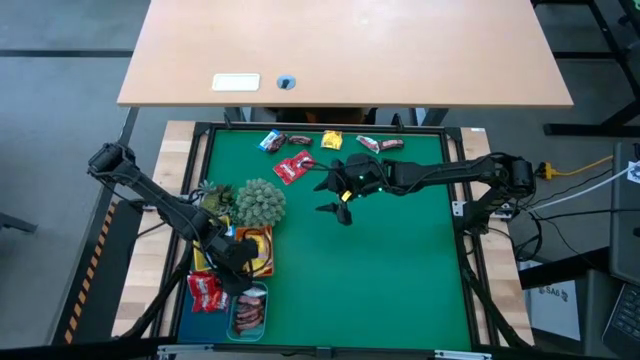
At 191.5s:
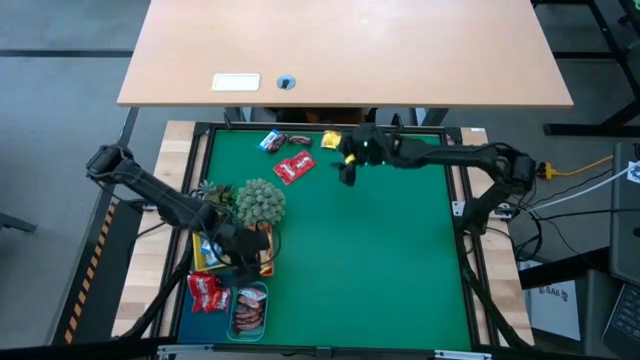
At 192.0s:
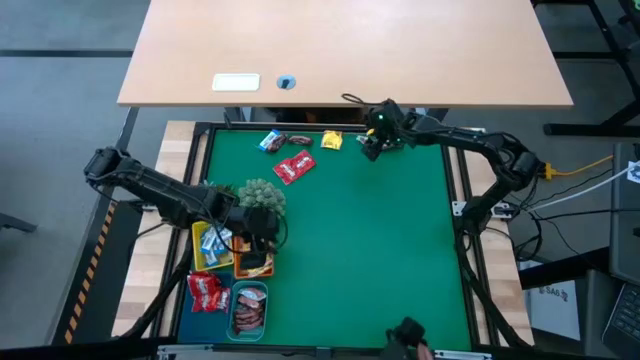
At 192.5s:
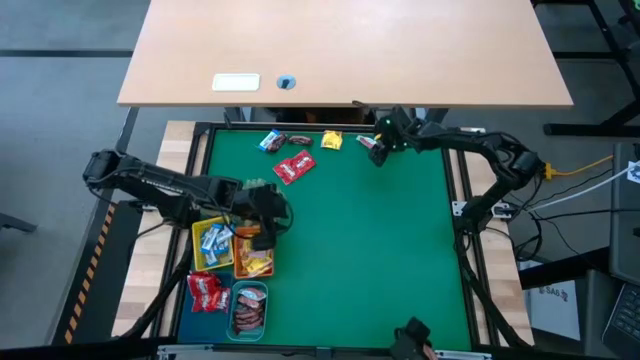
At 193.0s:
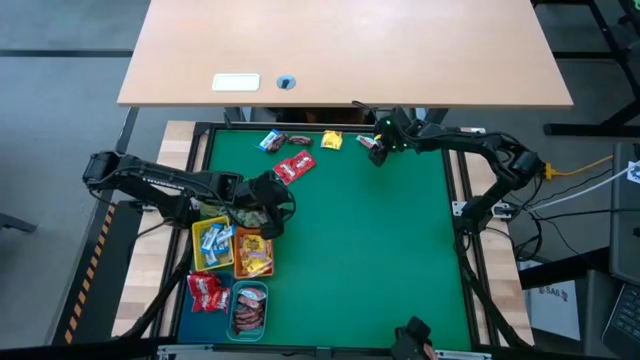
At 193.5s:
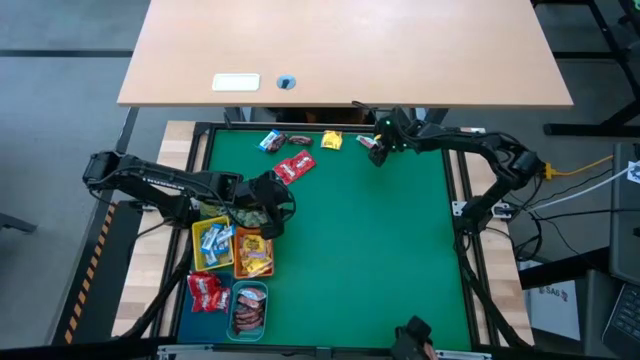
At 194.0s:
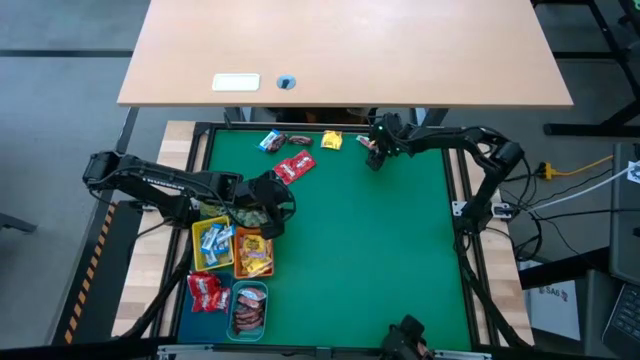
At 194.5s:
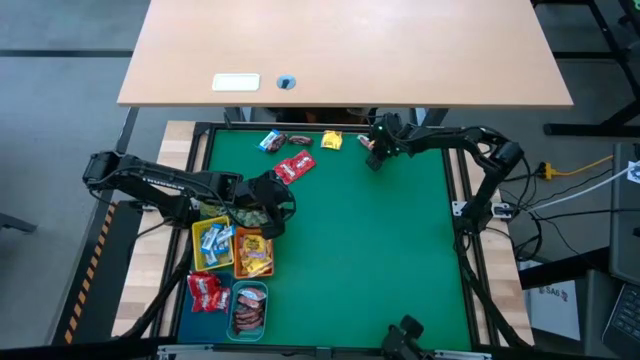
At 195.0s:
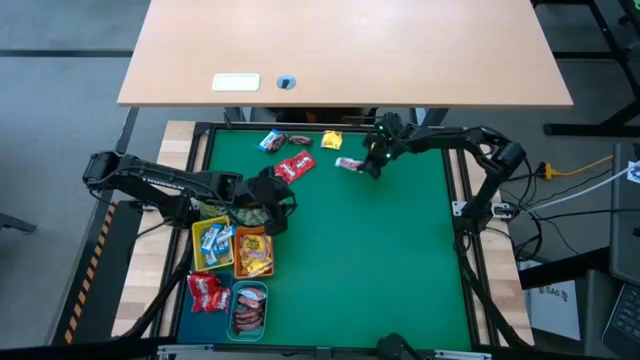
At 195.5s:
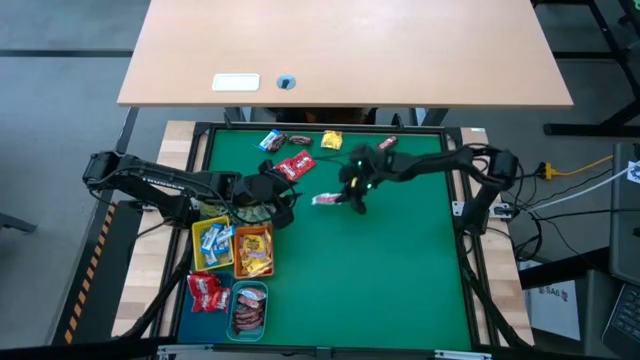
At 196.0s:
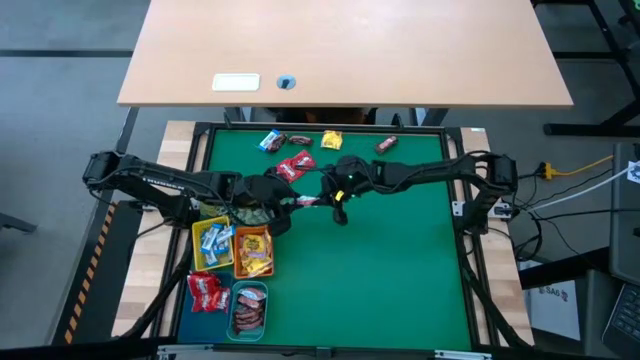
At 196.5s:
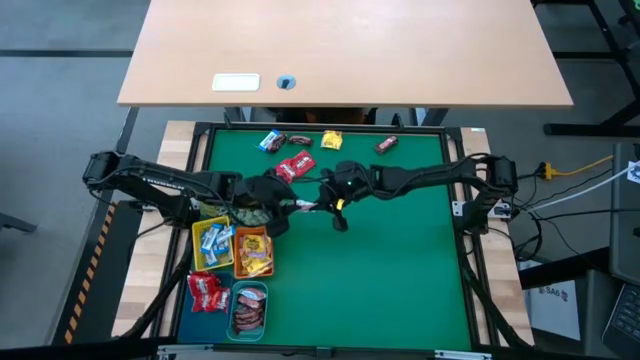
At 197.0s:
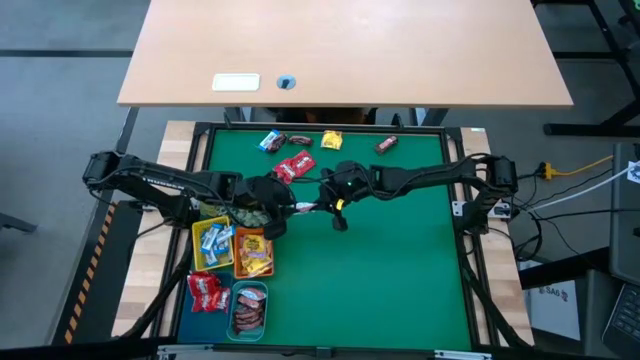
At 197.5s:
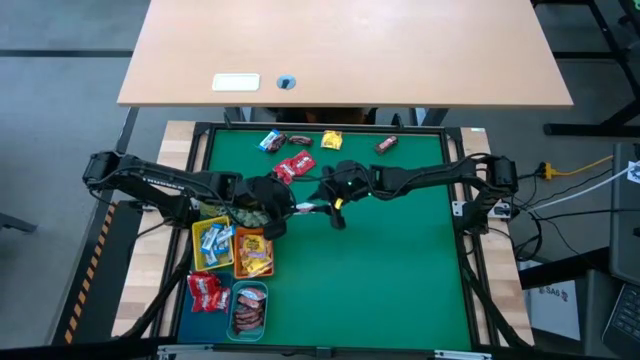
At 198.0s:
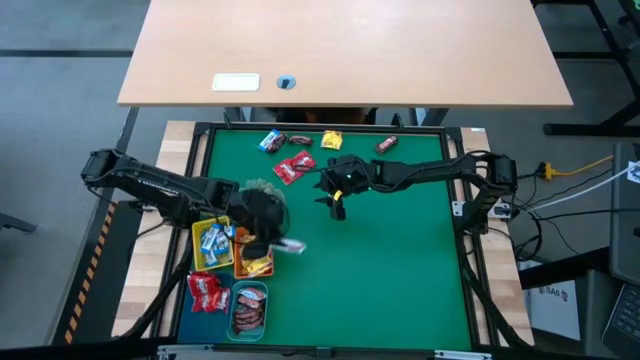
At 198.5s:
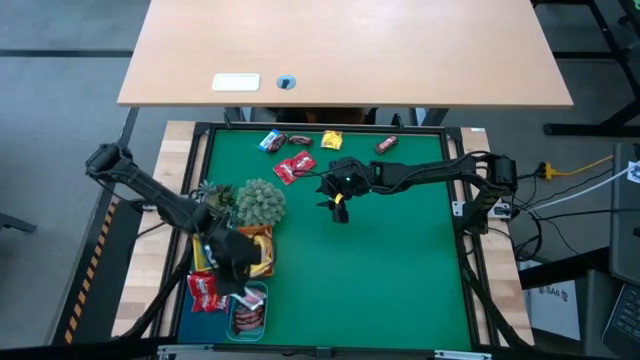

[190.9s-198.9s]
Task: Sort candy
Put the white chocolate into the green basket

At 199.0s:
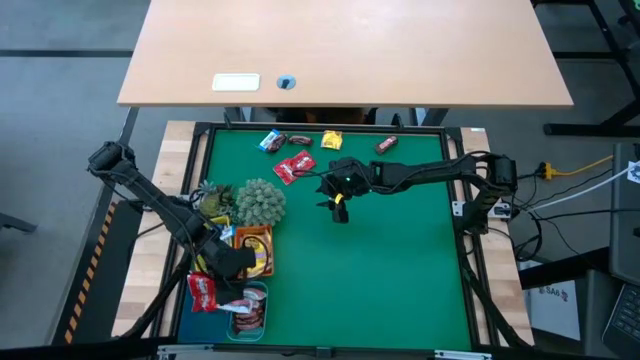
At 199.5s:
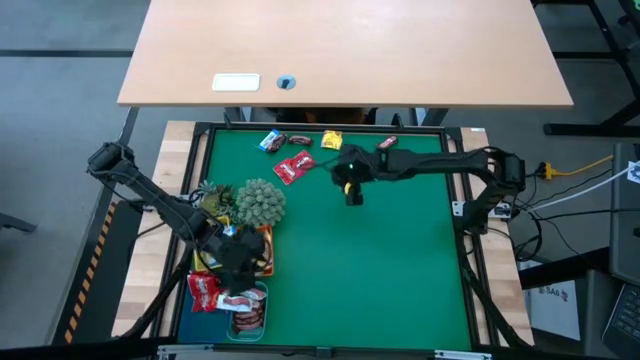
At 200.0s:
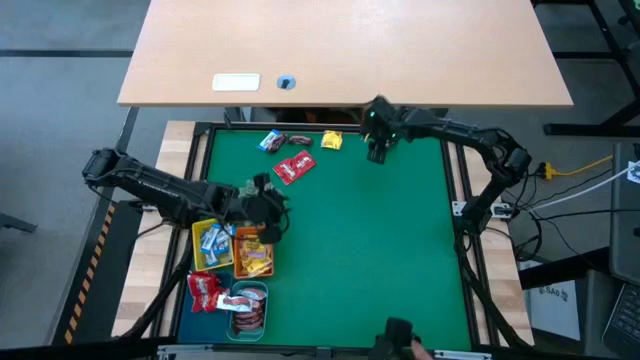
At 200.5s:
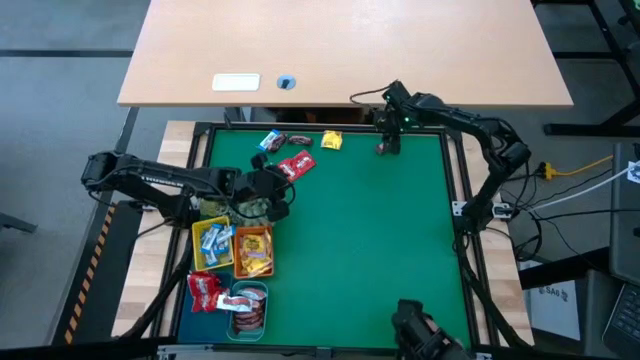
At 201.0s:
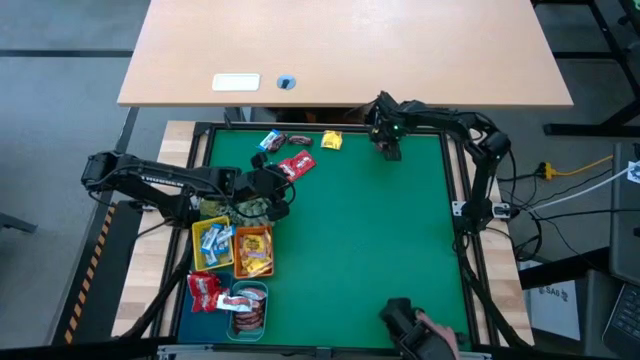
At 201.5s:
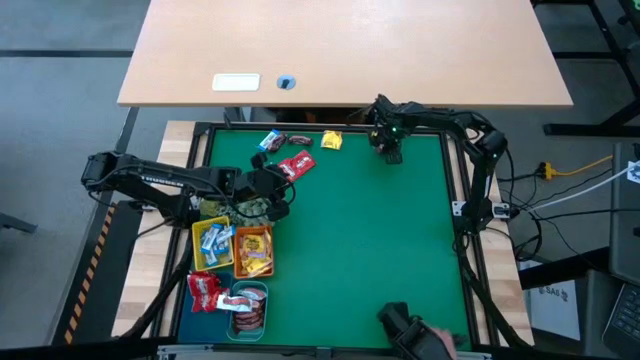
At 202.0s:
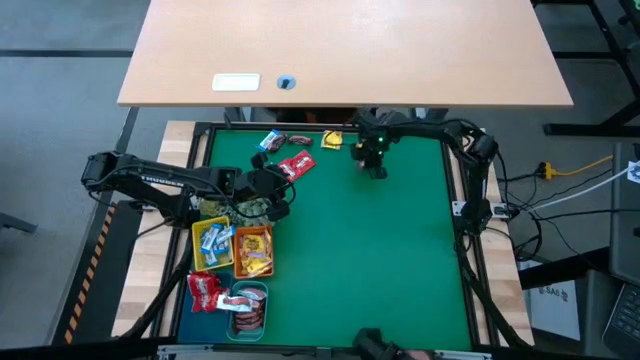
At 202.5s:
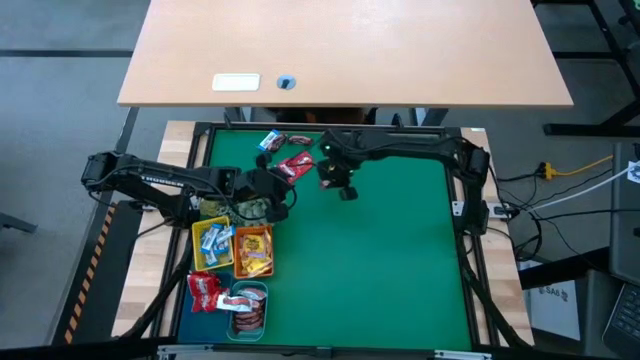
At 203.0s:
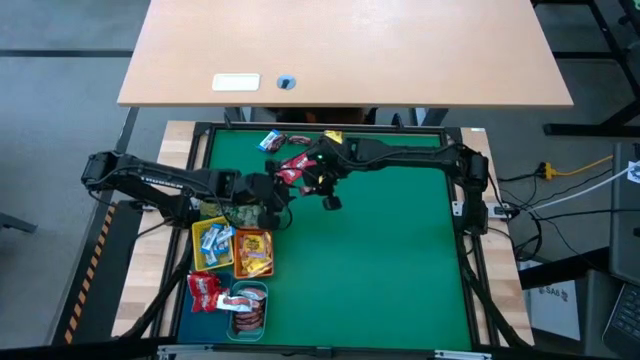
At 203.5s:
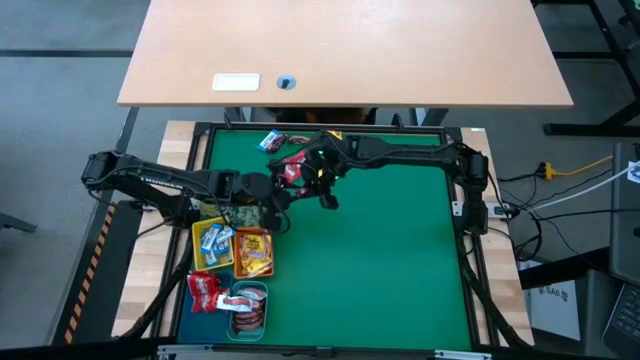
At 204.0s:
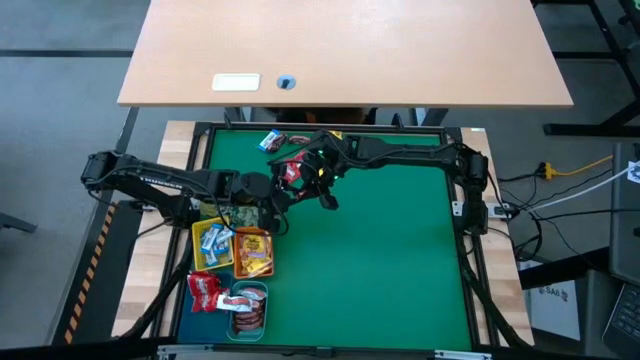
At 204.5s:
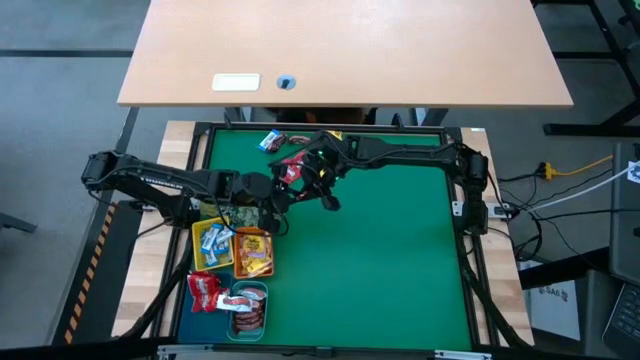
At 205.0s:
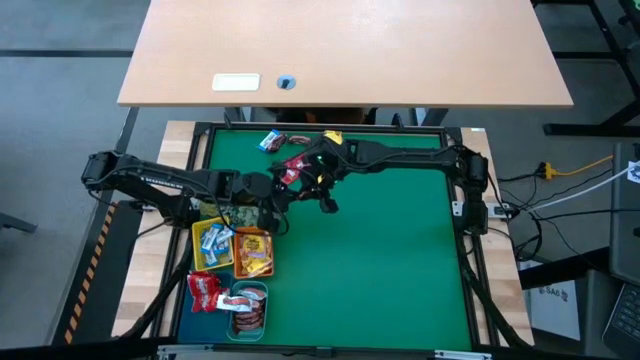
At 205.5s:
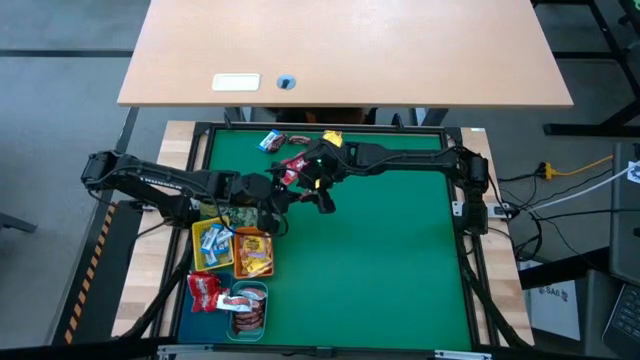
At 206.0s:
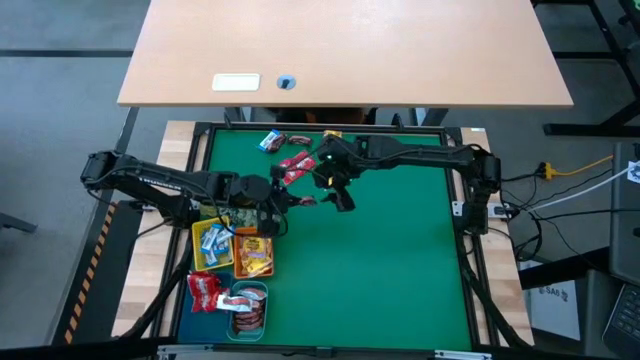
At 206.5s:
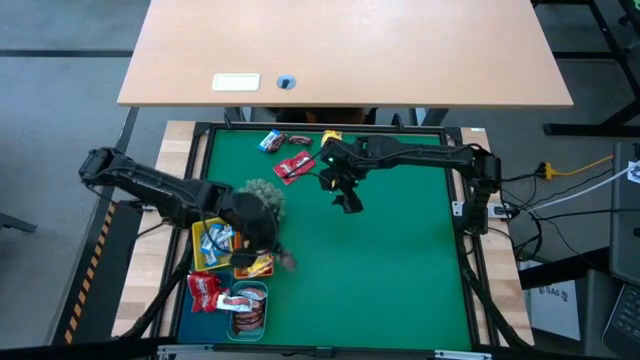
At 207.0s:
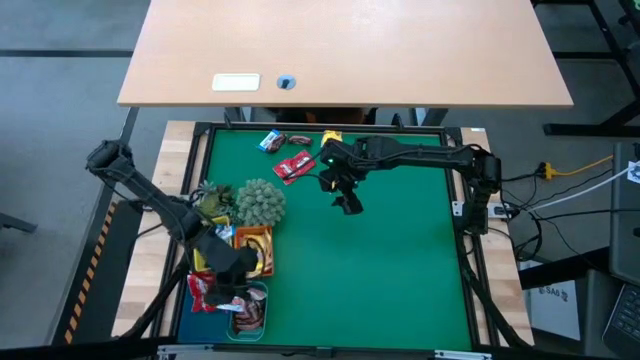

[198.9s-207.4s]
Put the brown chocolate into the green basket

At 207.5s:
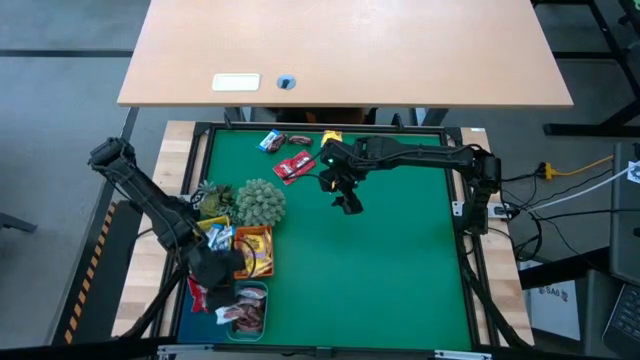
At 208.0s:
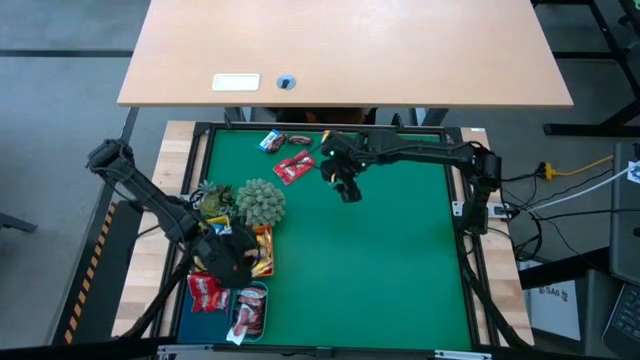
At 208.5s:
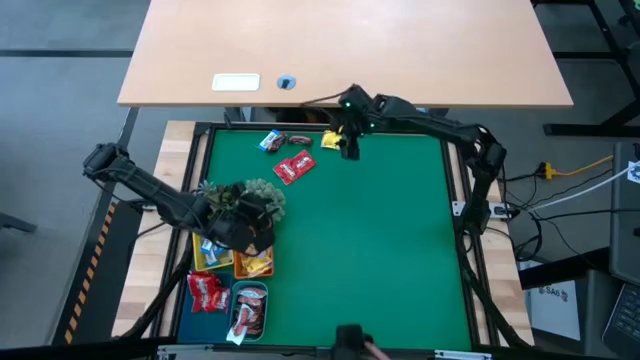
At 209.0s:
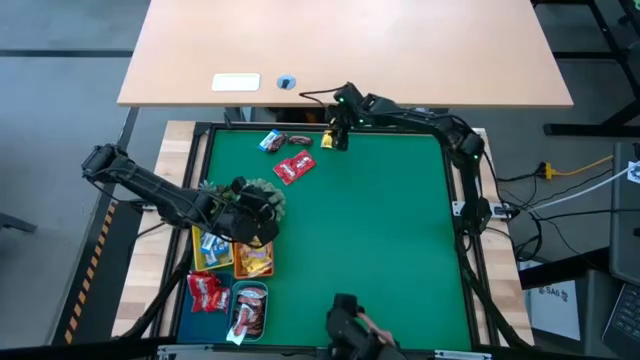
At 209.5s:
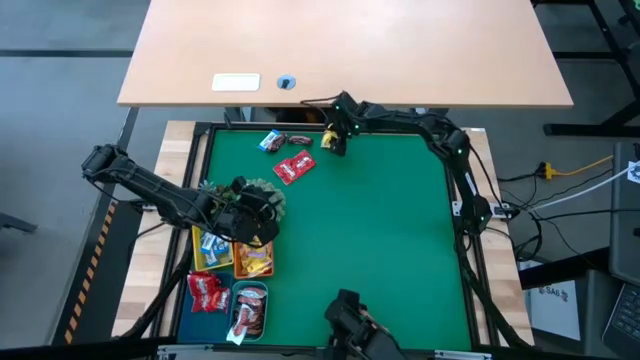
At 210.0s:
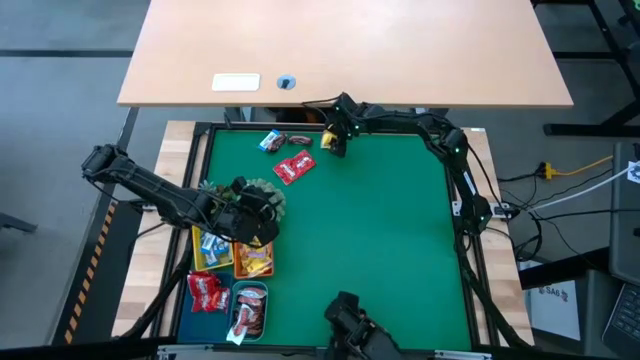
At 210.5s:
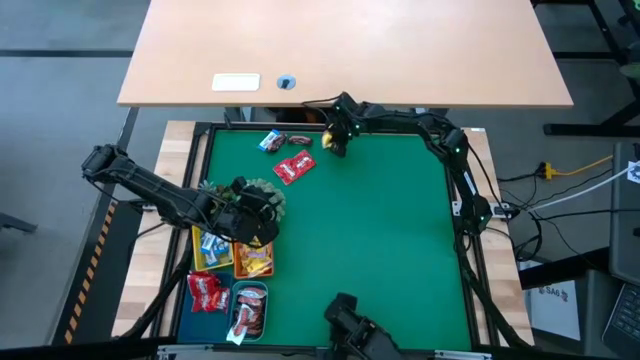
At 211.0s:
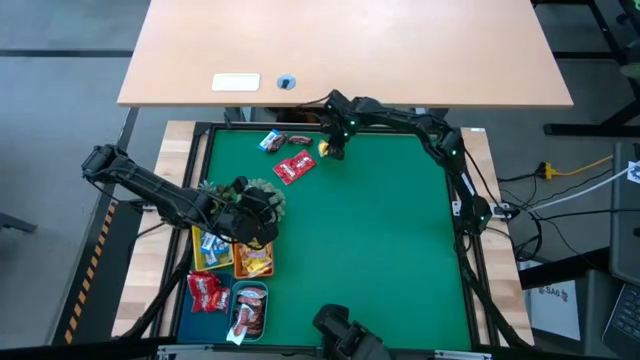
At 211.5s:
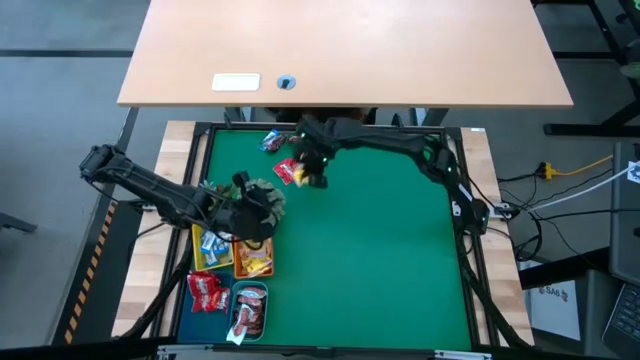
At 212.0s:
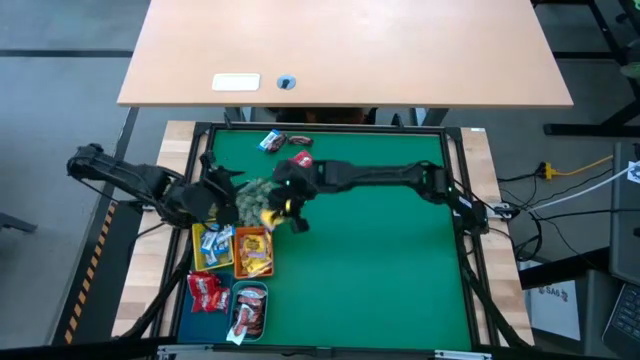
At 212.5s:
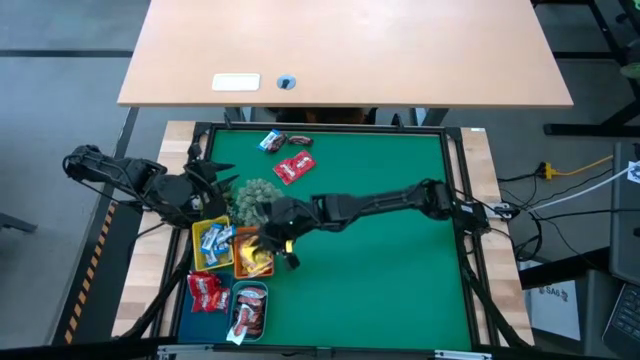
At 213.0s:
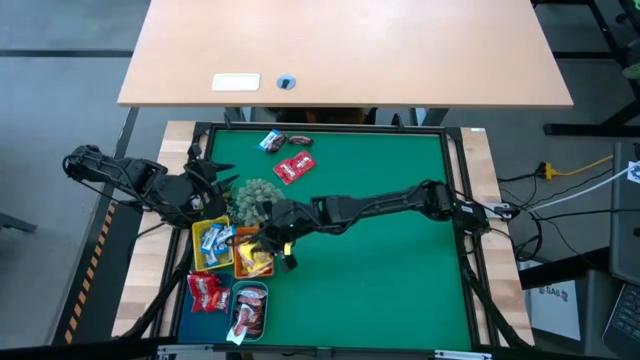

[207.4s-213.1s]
Put the yellow candy into the orange basket
